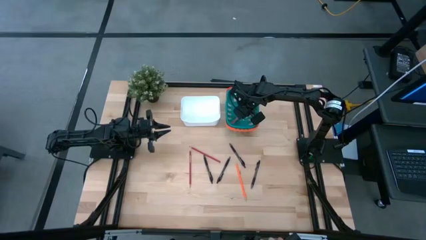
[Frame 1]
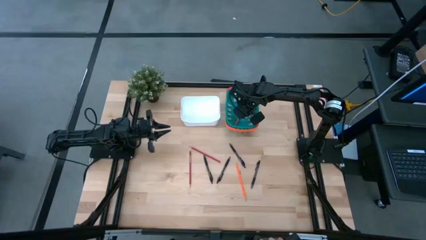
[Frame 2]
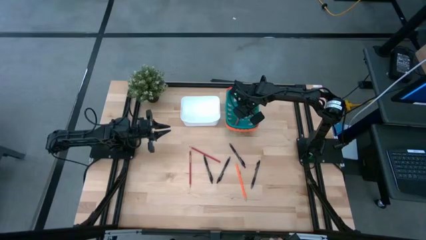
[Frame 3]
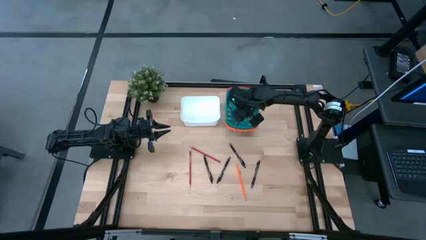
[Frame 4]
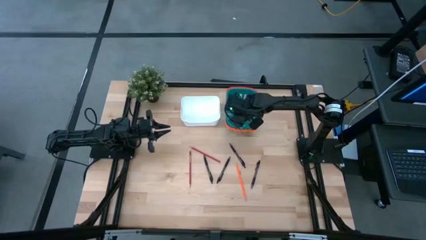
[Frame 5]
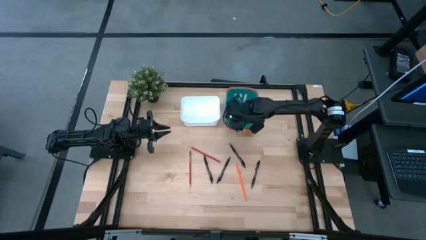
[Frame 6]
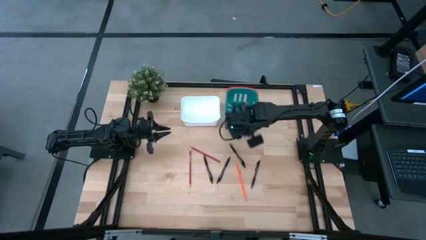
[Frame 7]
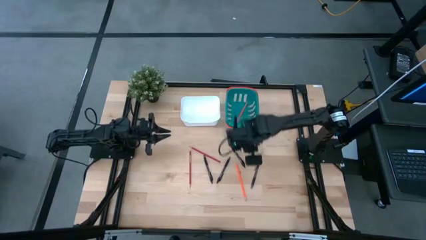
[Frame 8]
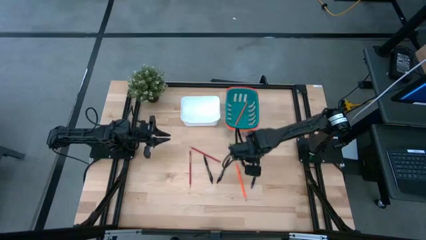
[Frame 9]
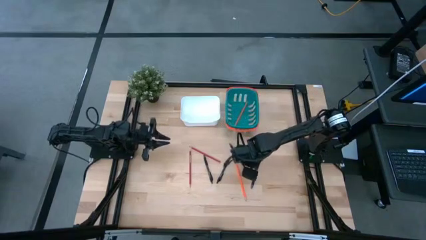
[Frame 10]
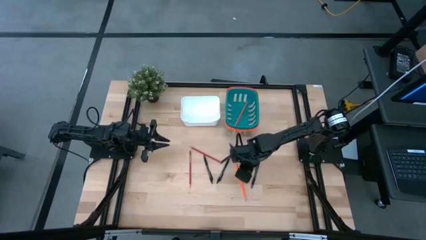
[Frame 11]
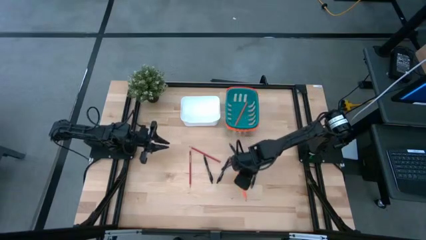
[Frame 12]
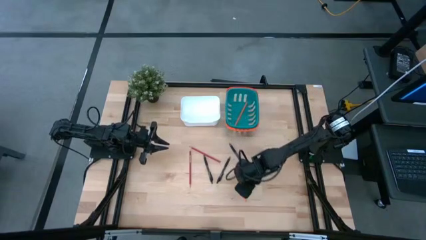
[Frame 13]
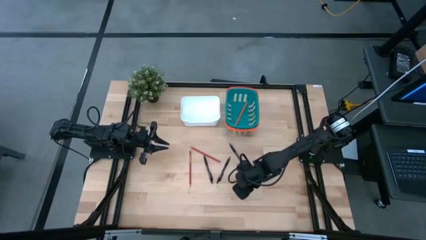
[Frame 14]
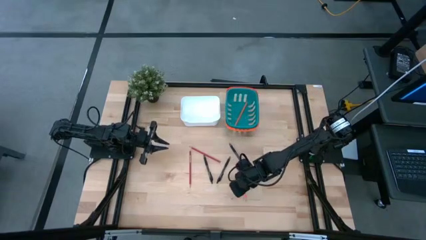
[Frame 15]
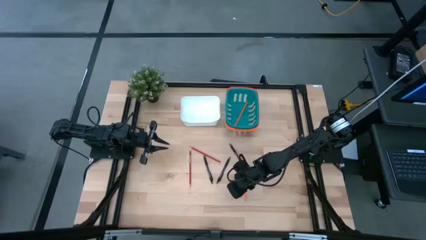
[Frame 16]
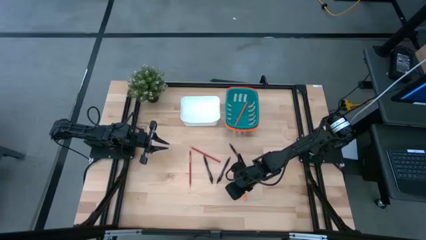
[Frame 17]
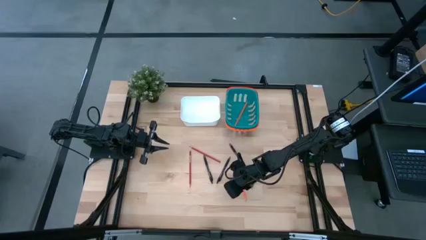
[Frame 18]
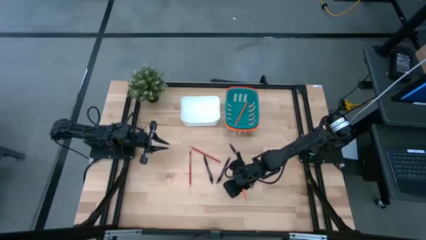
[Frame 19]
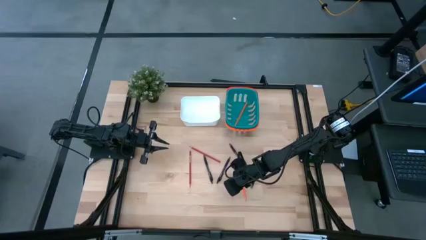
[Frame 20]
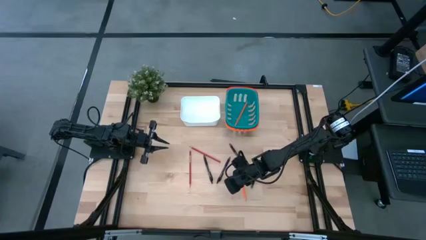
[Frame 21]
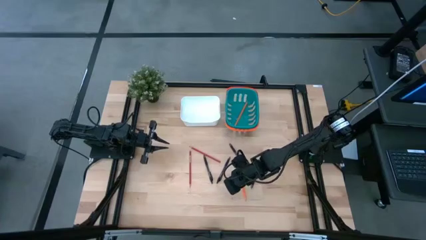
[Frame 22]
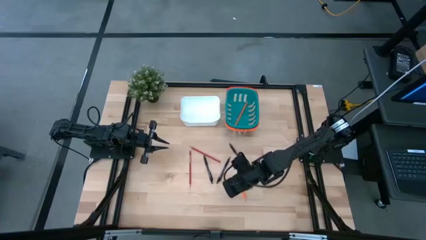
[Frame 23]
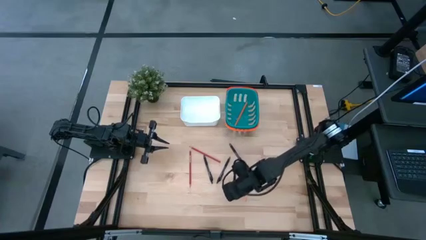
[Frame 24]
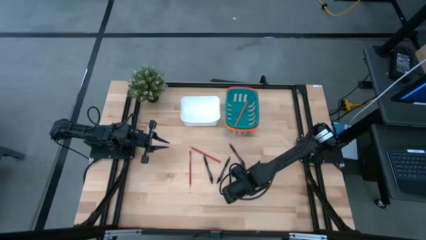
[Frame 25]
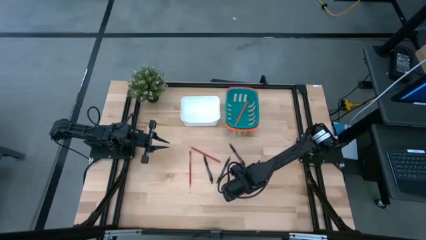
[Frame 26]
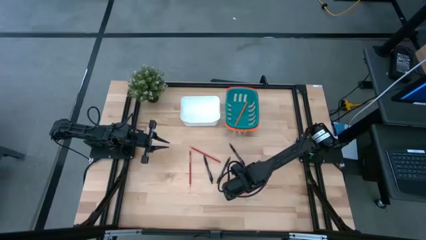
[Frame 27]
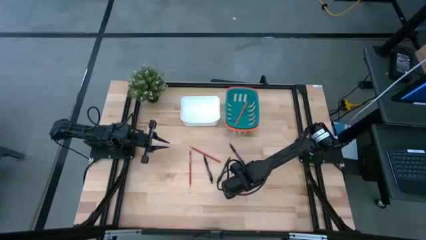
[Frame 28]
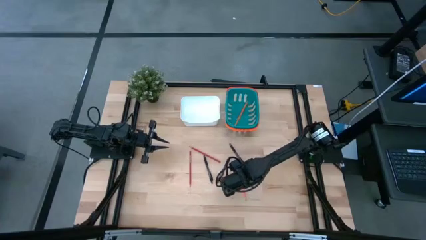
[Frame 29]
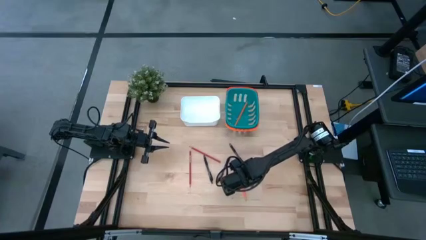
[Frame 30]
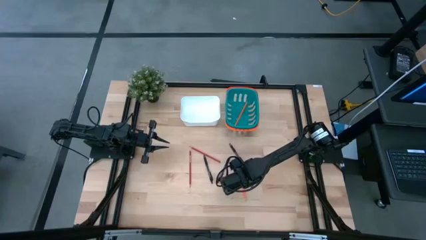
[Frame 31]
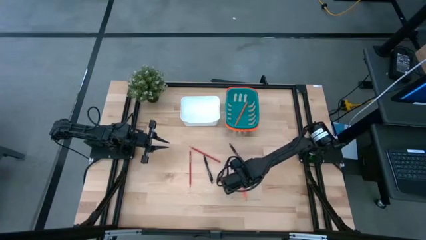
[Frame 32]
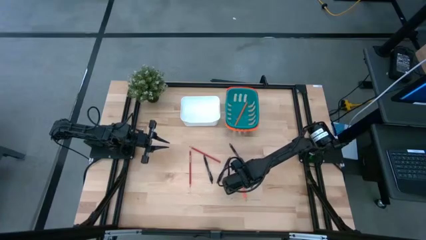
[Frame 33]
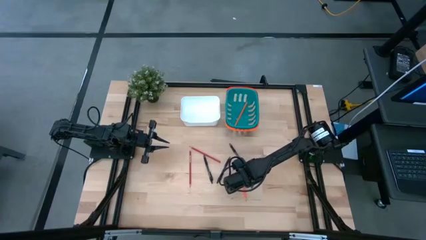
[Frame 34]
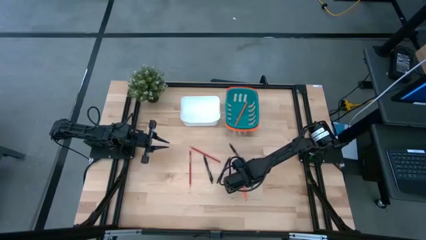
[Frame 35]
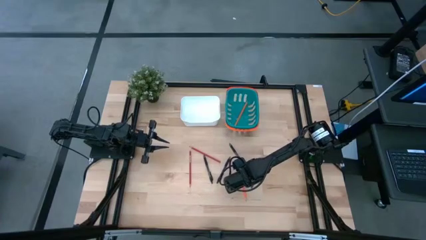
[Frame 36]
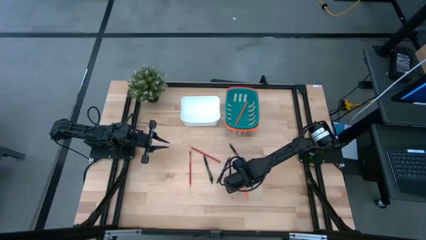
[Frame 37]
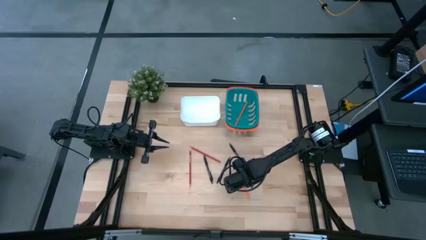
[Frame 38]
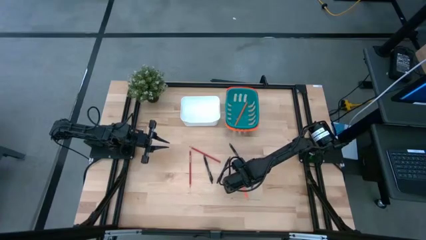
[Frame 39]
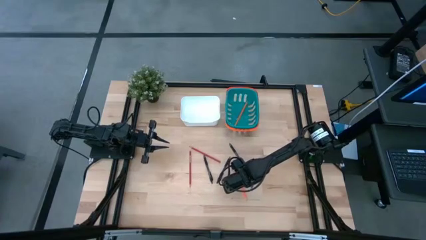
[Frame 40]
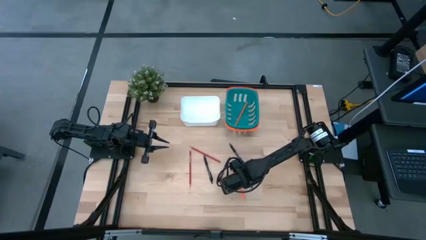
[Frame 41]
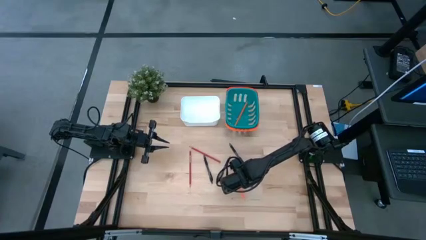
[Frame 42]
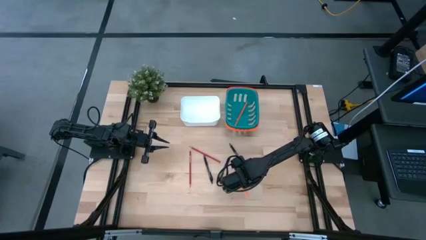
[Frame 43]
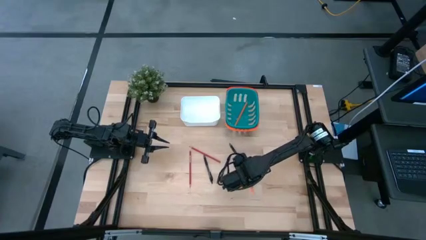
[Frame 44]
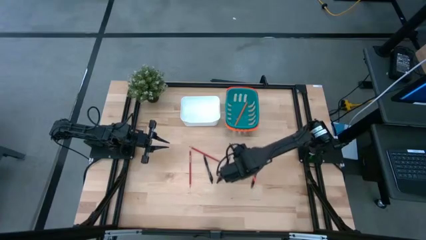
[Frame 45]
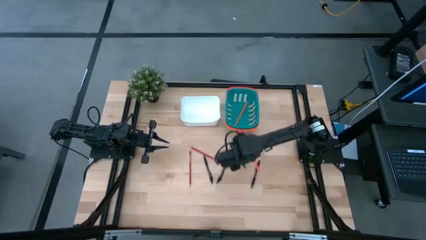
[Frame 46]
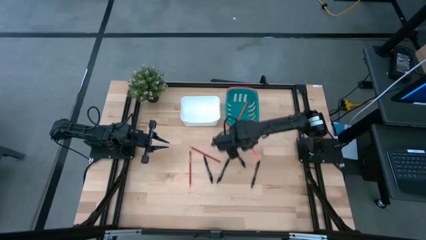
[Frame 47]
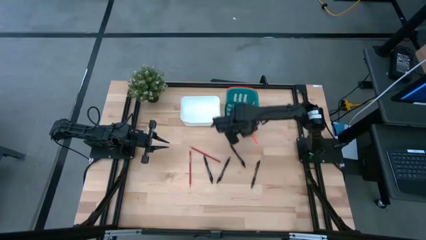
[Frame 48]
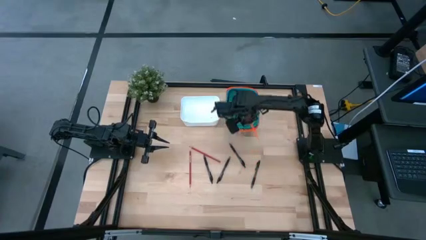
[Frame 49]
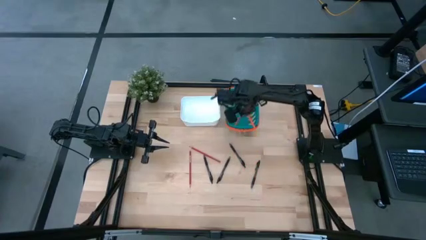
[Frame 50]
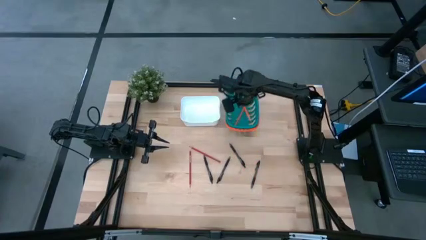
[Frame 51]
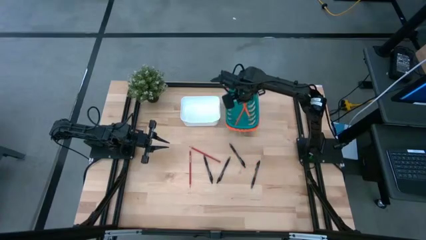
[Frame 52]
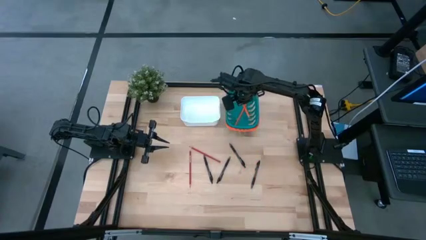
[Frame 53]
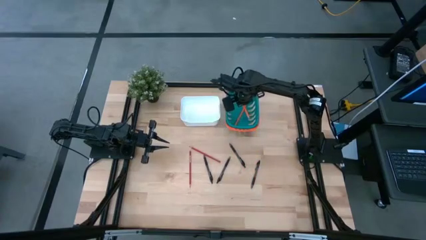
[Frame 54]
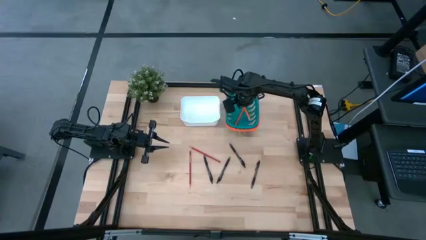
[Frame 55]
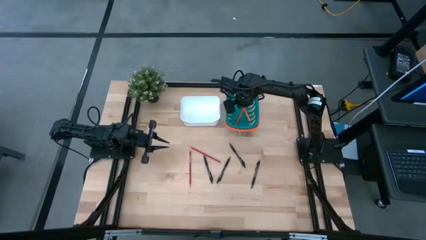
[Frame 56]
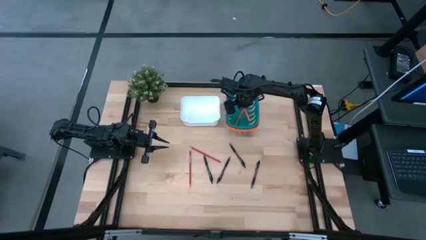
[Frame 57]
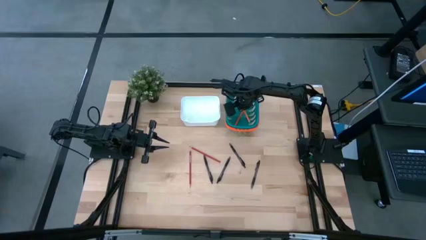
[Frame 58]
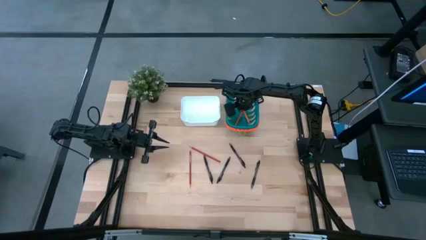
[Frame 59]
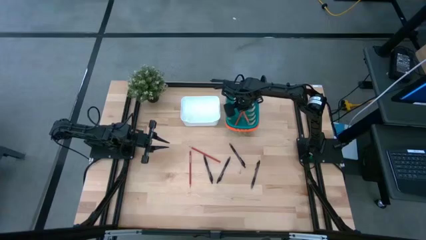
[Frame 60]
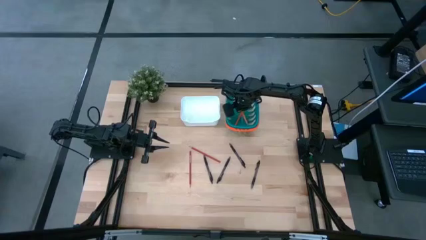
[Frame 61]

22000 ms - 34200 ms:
Task: Sort pens & pencils
Put the orange pencil into the blue bin

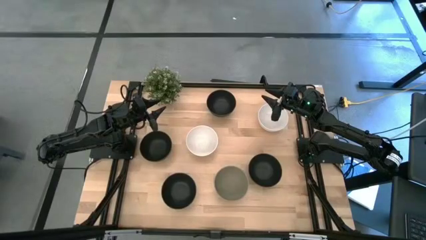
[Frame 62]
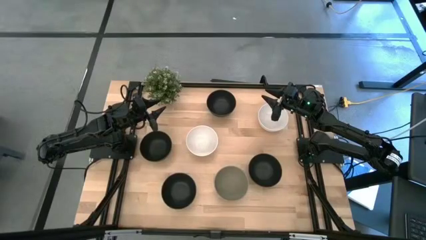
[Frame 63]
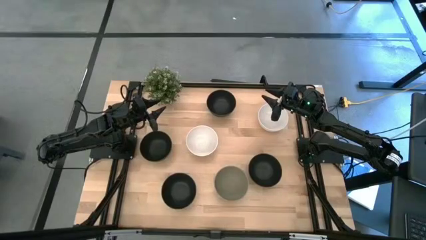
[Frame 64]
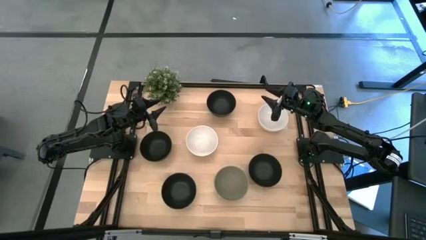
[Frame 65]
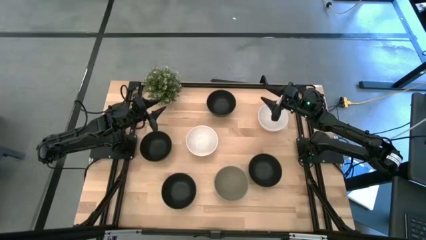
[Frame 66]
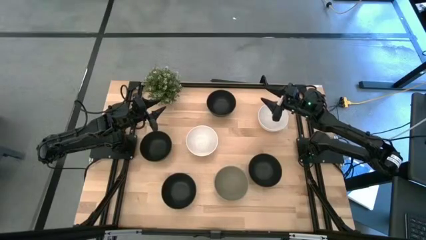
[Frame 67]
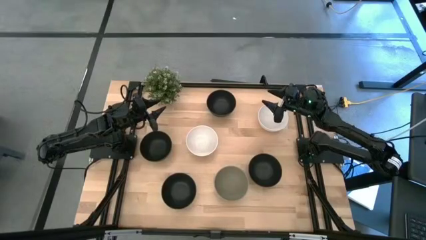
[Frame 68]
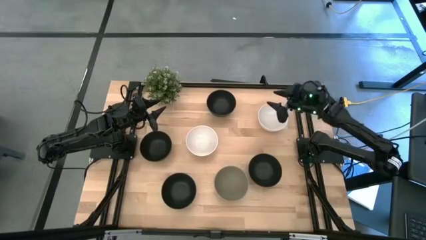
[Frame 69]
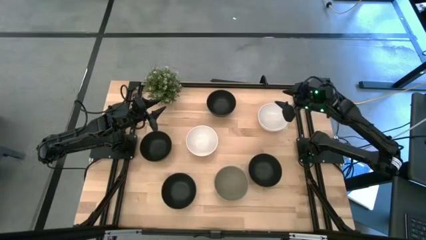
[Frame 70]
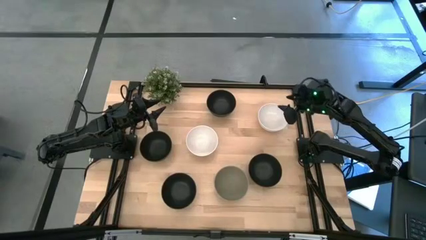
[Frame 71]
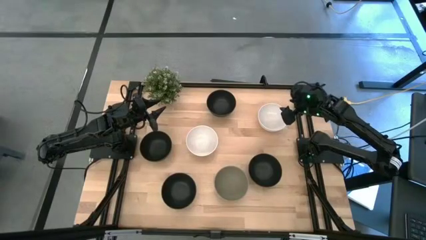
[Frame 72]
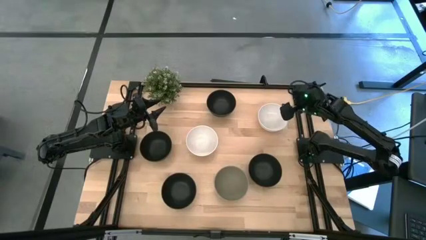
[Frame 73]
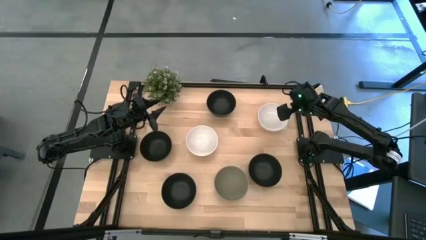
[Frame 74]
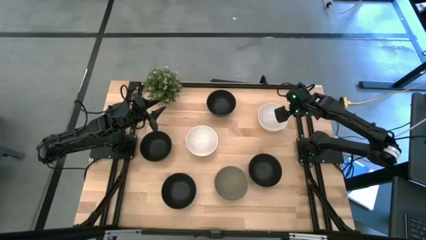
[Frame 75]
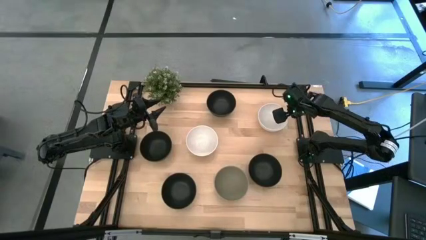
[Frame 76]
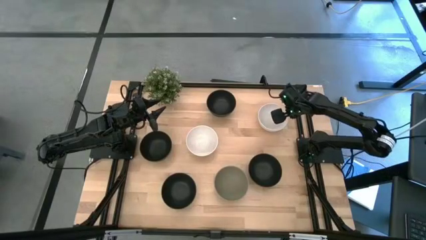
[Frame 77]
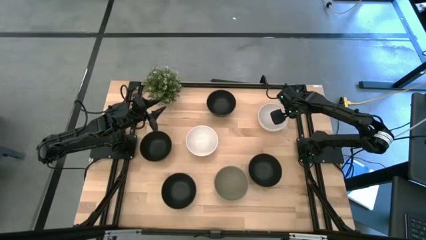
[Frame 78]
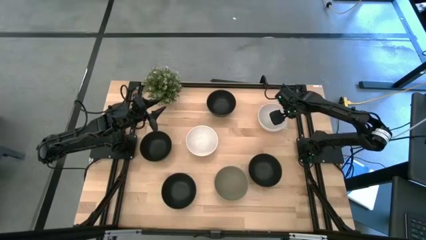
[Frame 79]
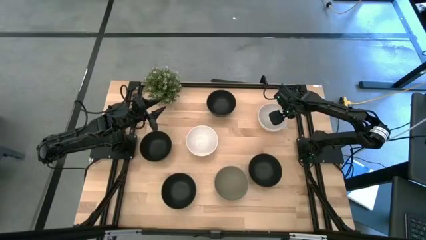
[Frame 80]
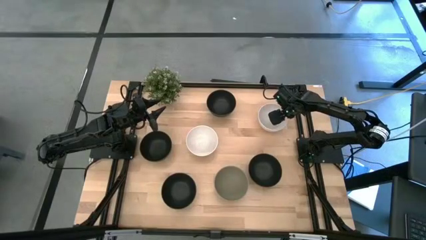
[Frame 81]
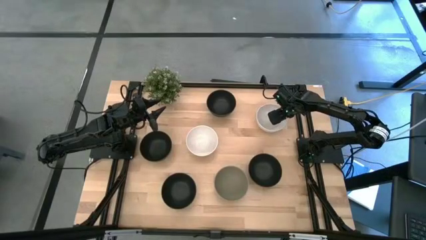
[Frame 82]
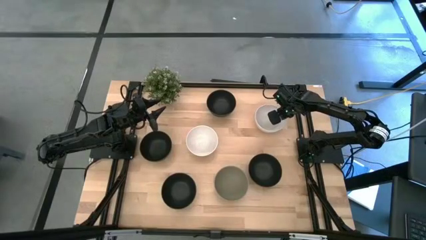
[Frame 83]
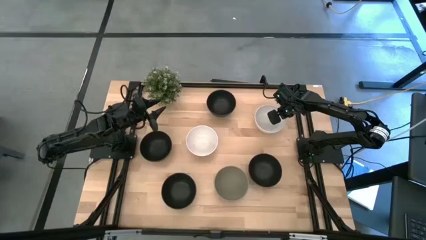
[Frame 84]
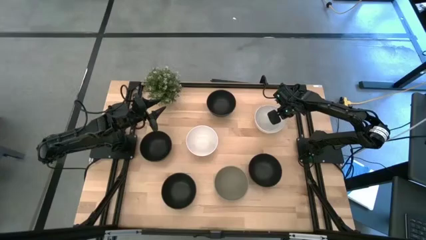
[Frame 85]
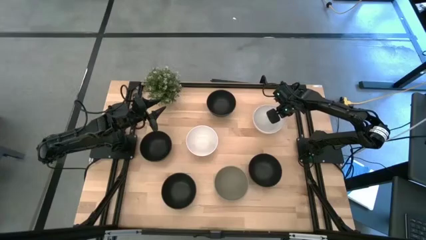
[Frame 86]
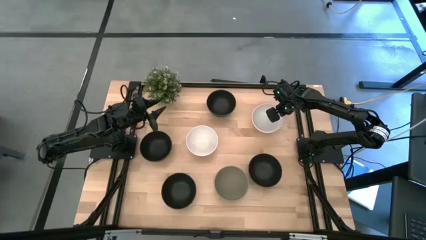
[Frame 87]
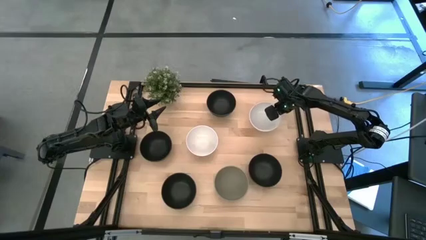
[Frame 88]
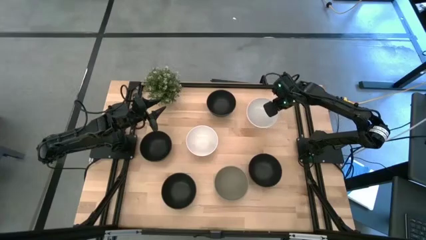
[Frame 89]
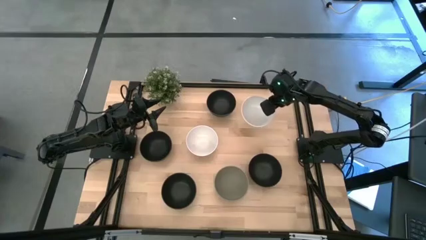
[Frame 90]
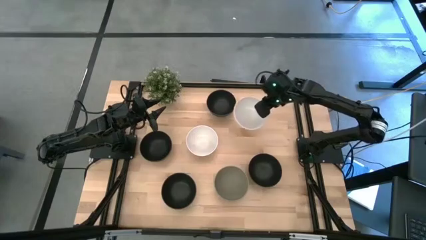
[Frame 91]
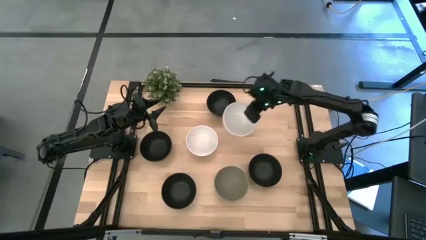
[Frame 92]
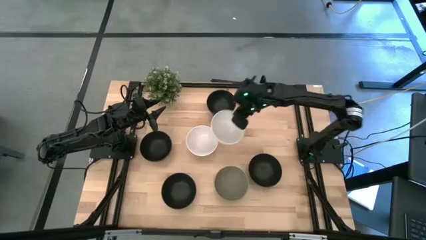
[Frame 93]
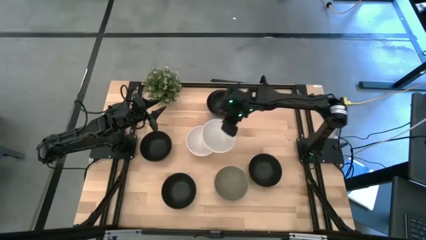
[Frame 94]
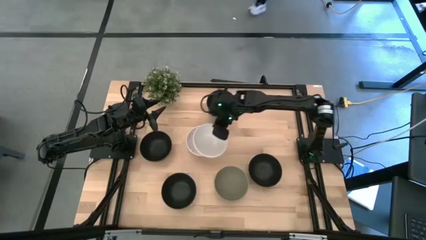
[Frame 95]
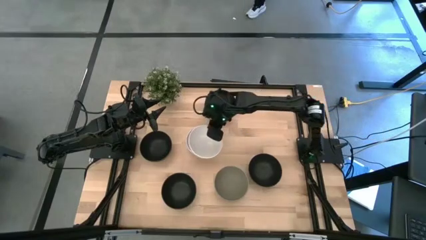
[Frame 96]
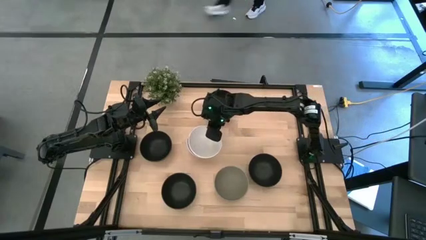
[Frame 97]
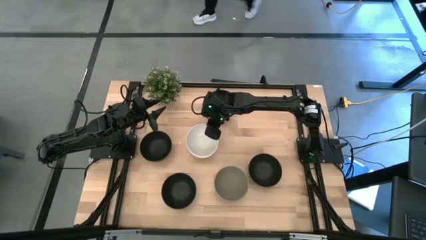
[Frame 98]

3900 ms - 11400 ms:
Task: Nest bowls inside each other
Stack the right white bowl on the white bowl
